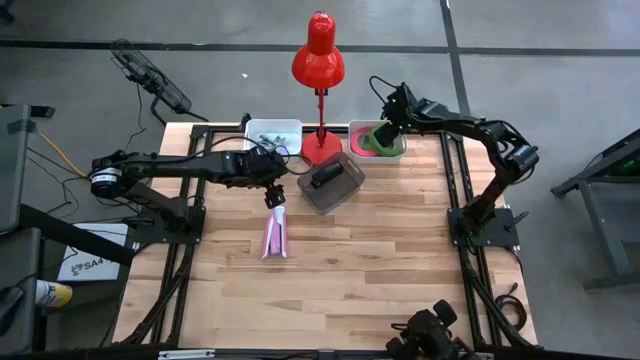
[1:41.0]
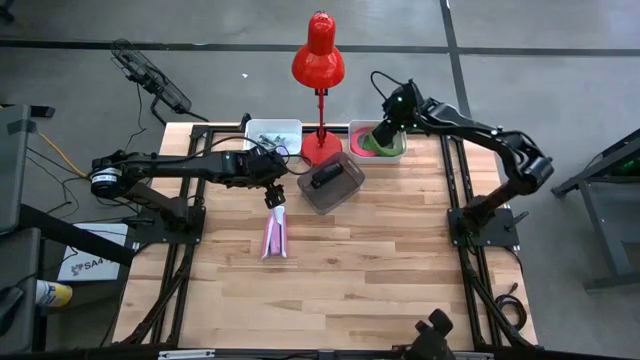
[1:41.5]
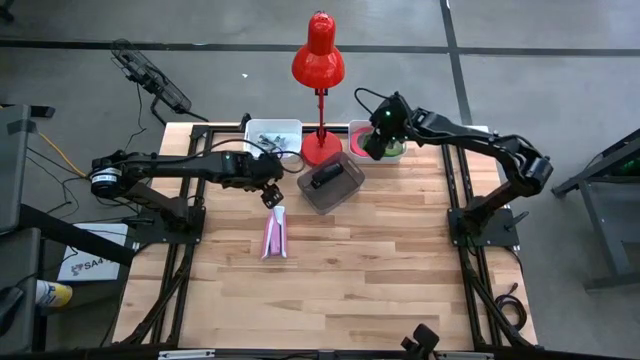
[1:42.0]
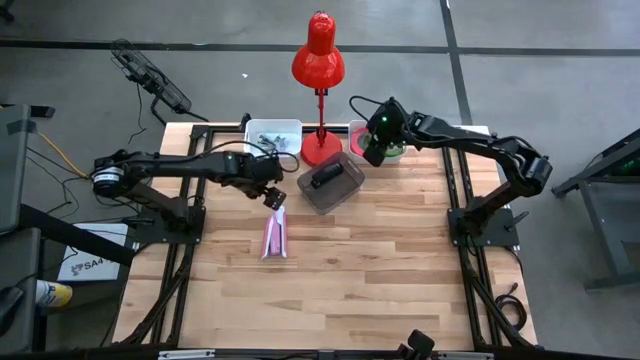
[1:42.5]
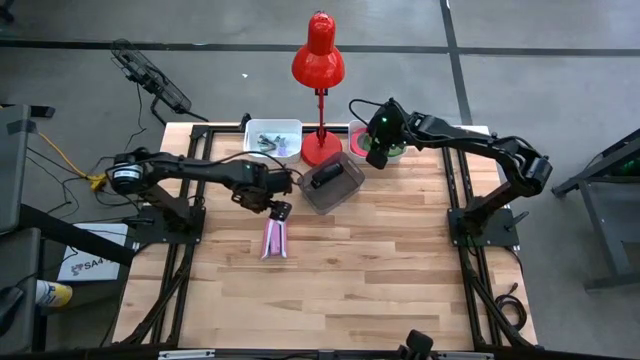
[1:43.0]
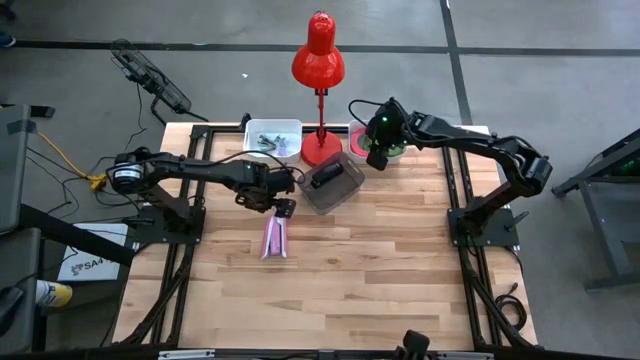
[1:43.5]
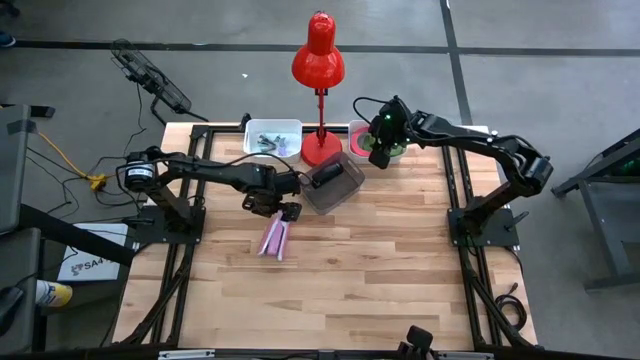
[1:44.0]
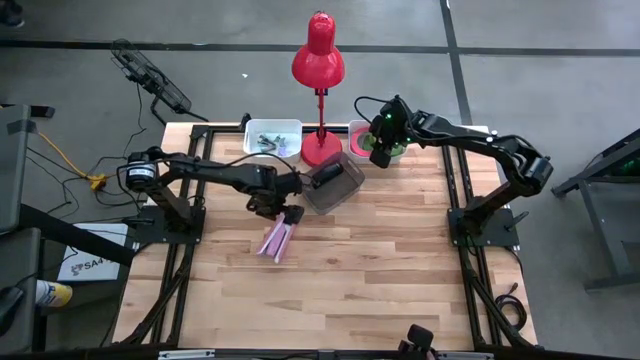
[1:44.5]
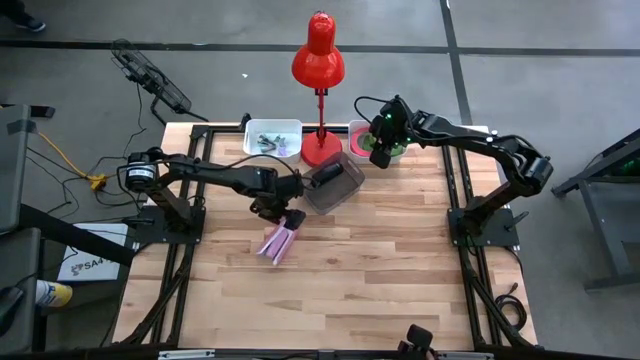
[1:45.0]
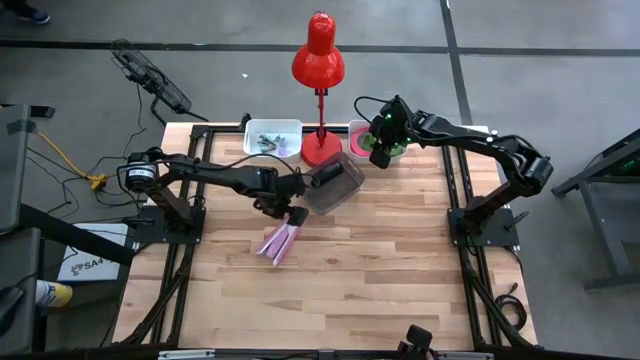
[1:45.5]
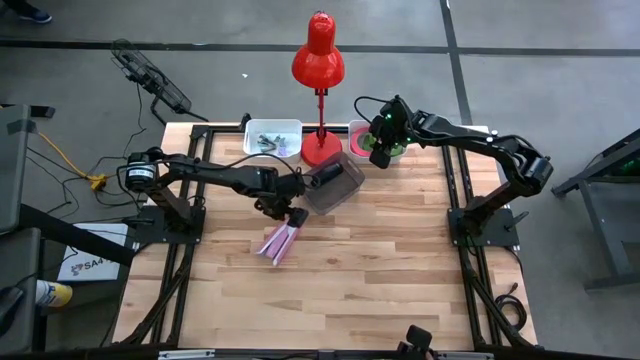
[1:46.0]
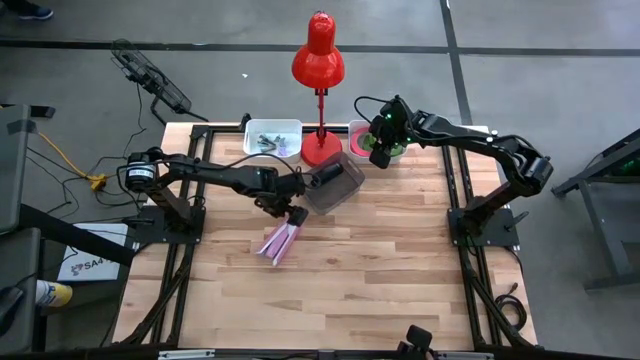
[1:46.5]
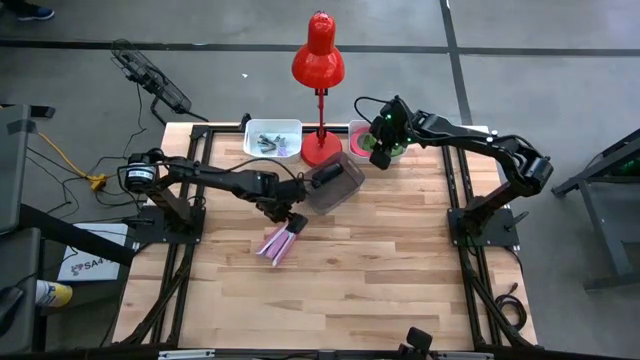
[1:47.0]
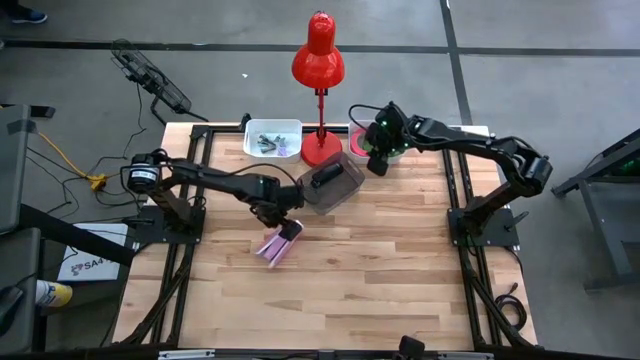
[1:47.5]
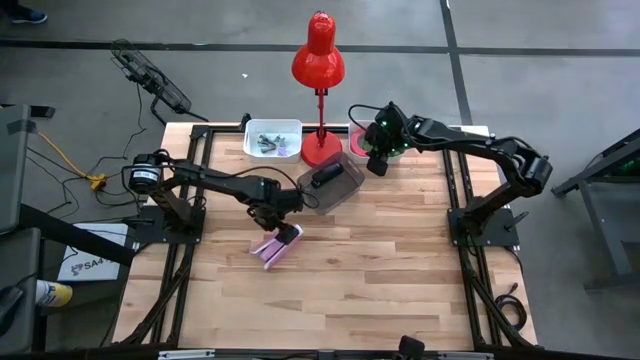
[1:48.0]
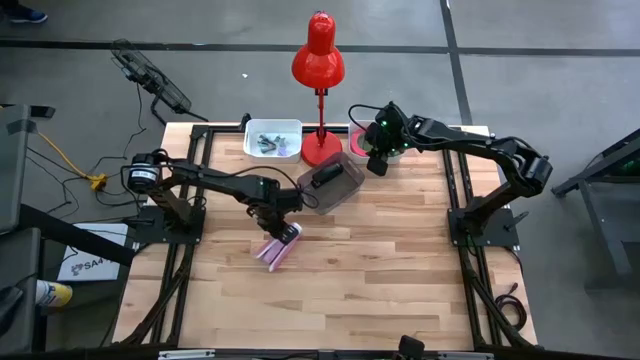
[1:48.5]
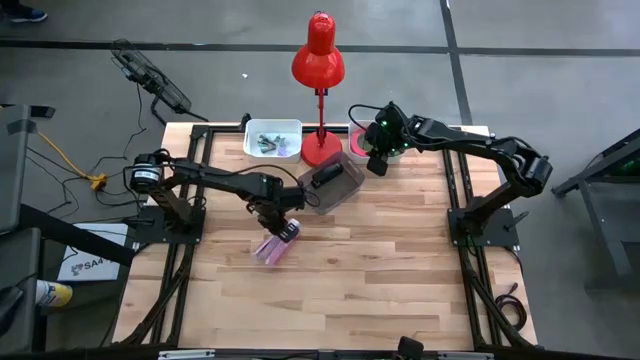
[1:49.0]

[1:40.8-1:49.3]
Task: Pick and place Stapler, Stapler remover, tape
Put the pink stapler into the black bin

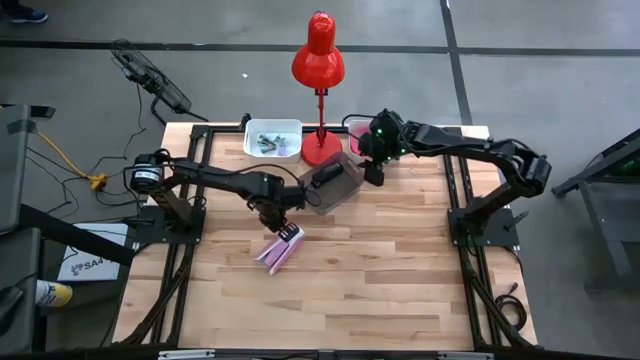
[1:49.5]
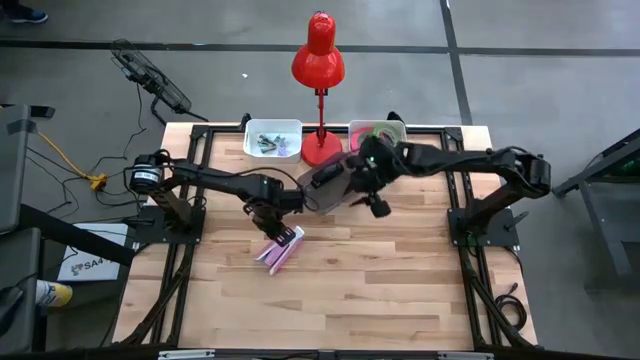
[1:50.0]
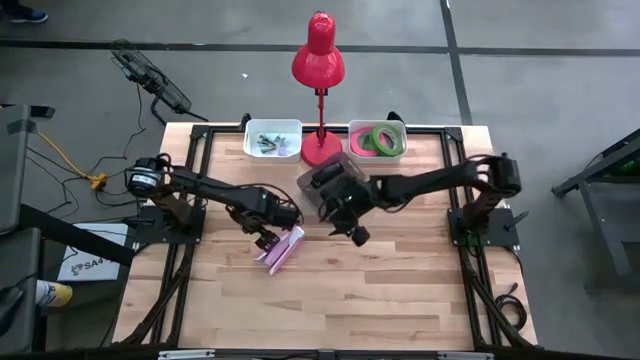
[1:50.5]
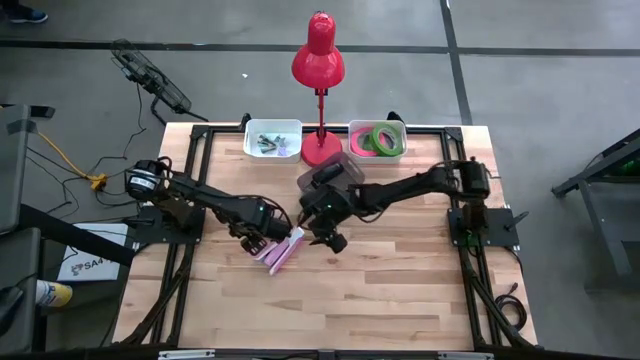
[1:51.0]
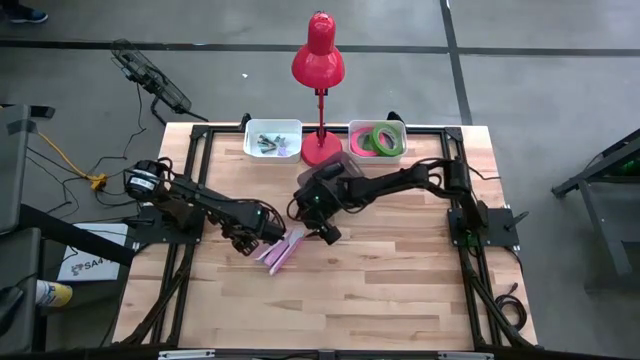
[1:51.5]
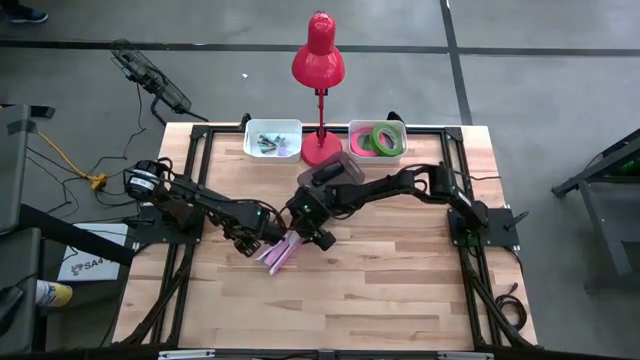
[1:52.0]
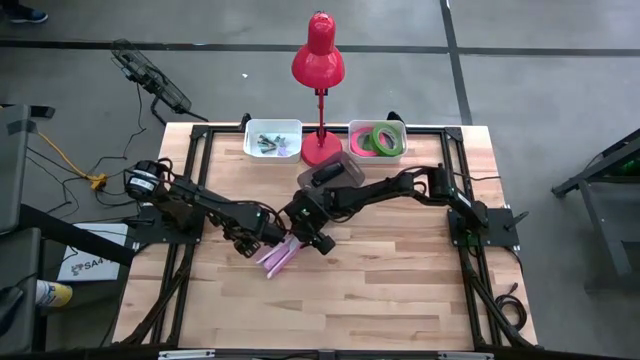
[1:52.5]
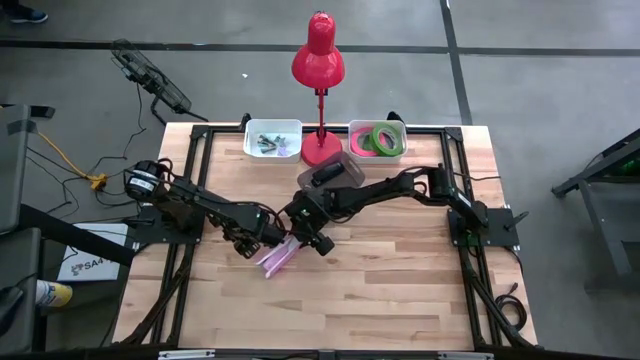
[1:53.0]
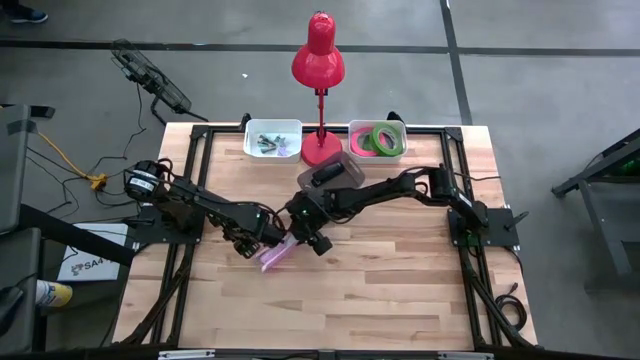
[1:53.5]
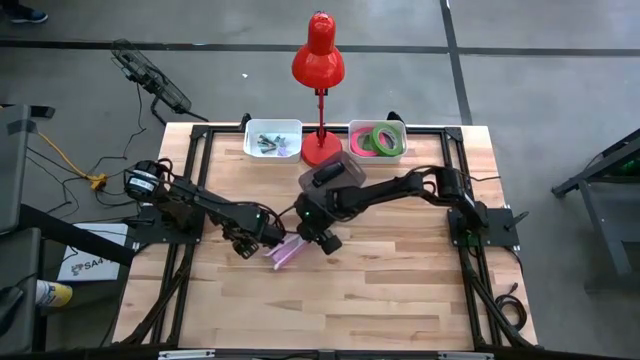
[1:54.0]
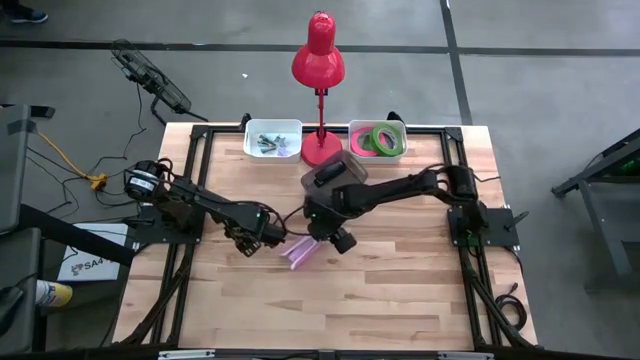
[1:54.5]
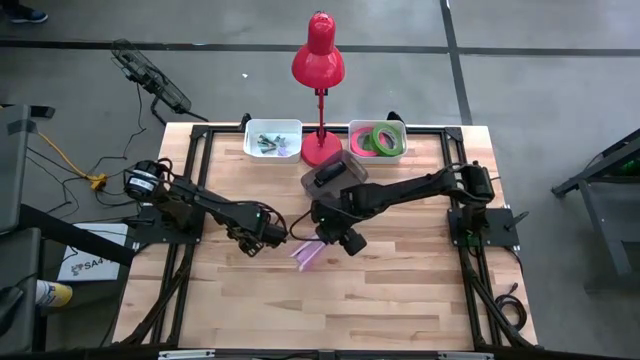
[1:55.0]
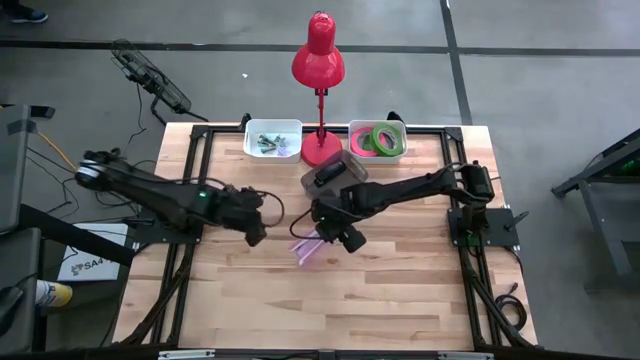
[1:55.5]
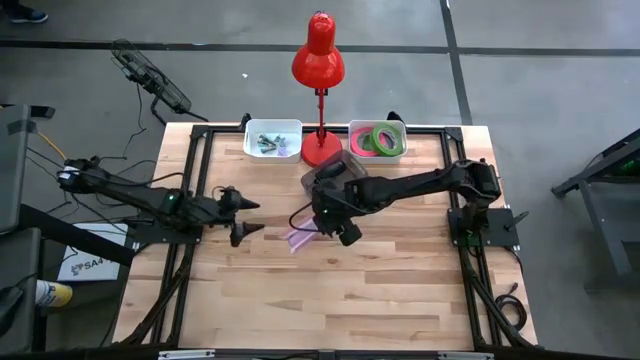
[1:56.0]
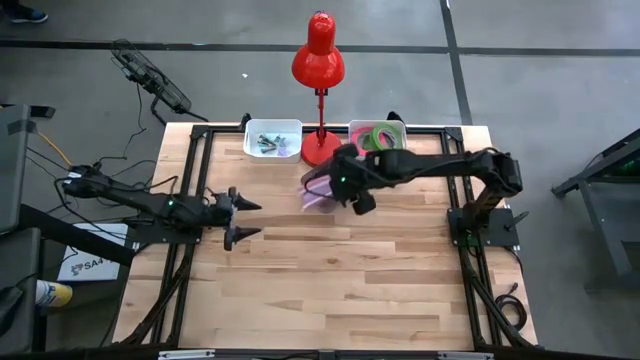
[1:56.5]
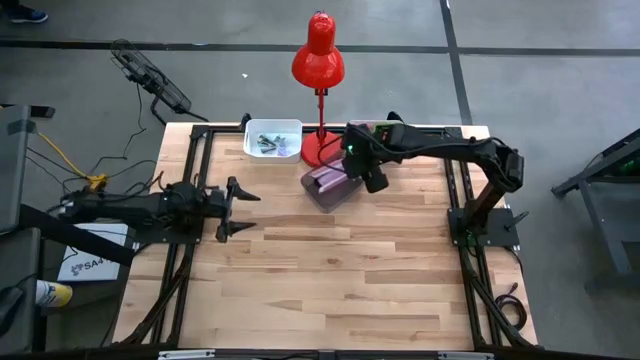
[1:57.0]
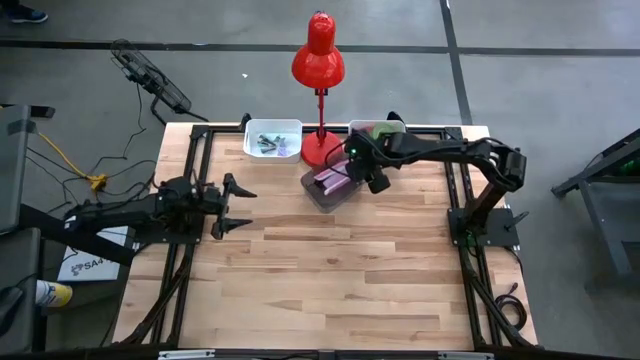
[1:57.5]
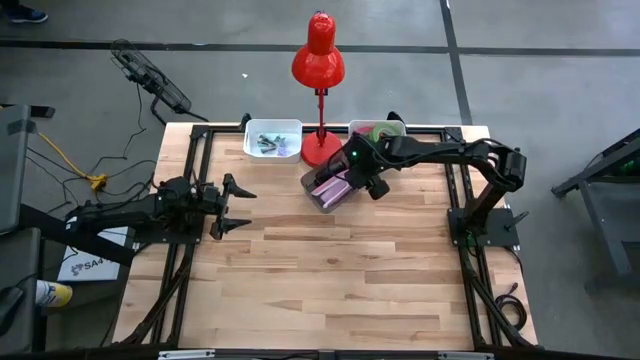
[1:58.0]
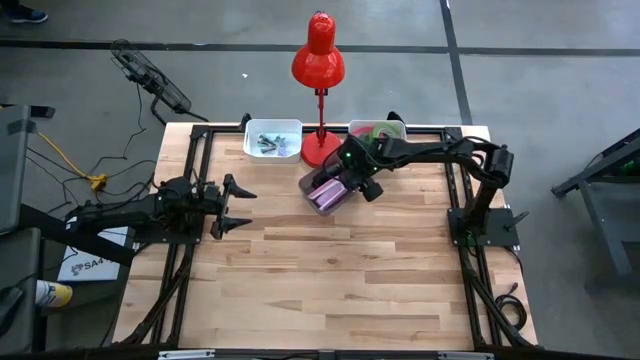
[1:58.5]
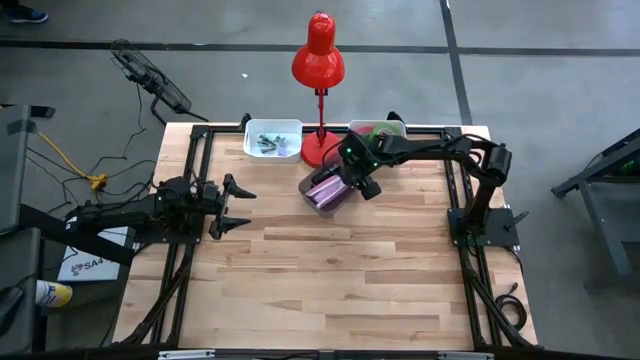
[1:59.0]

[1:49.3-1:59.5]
Put the pink stapler into the black bin

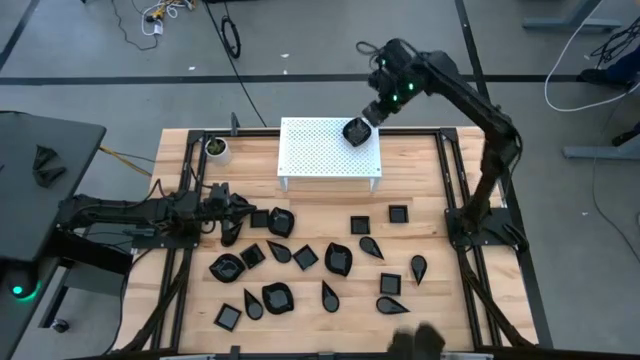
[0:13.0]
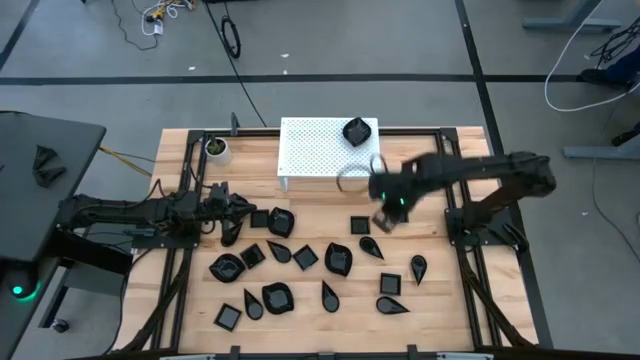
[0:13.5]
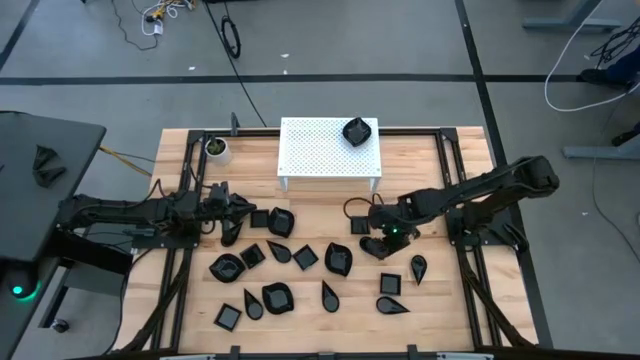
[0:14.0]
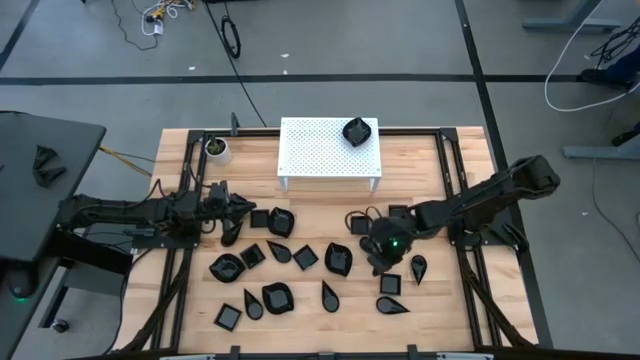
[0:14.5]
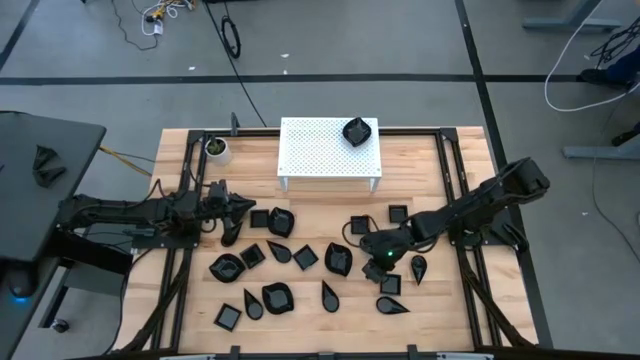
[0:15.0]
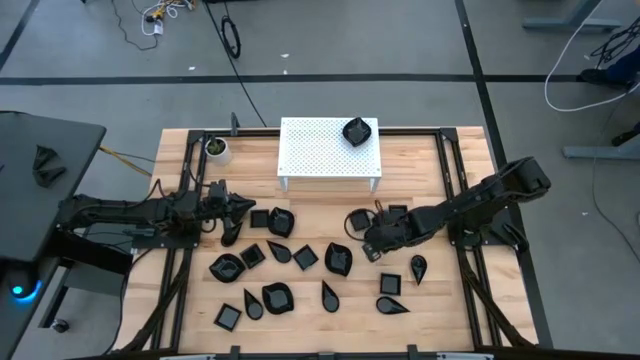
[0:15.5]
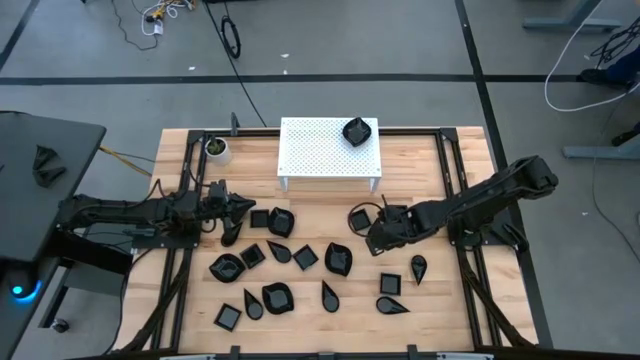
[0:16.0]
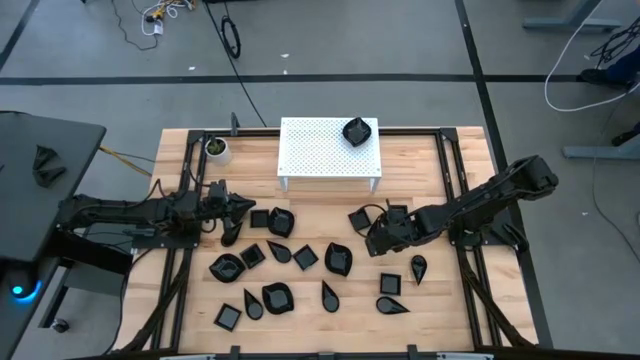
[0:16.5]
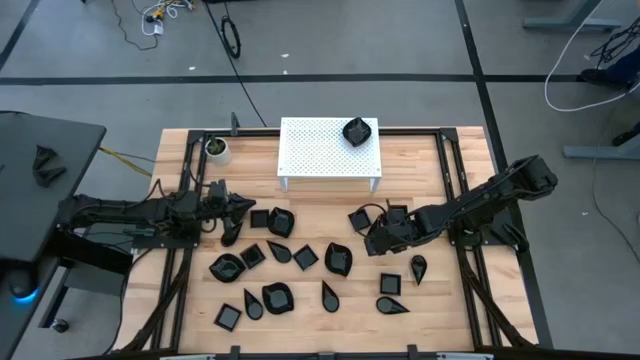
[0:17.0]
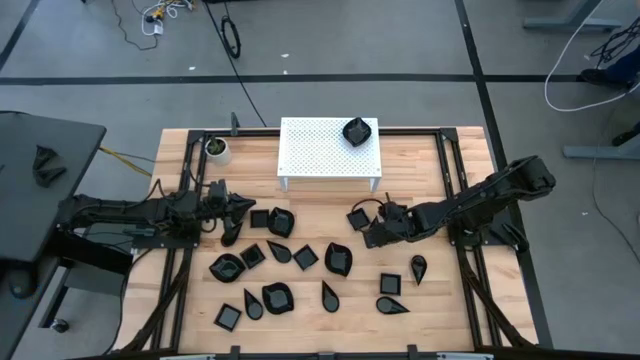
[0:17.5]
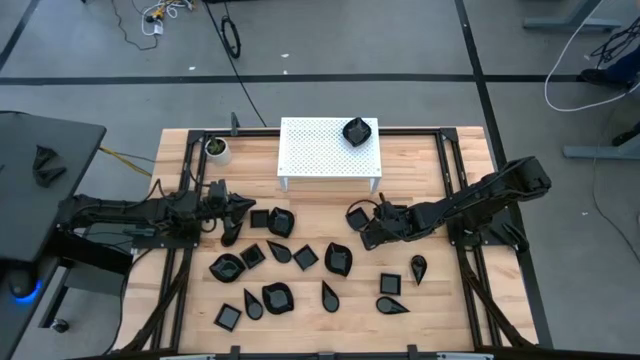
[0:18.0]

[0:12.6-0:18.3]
Task: Pick & Place Mini shaped plates
Put the black drop-shaped plate on the shelf
